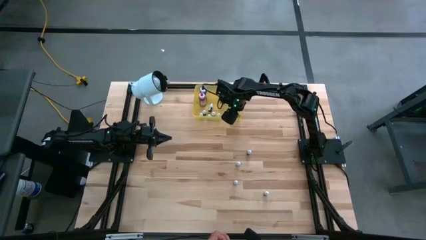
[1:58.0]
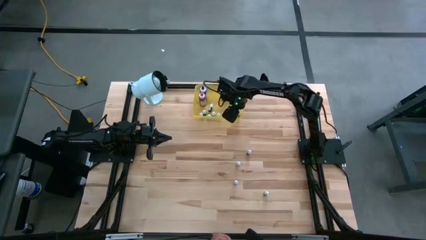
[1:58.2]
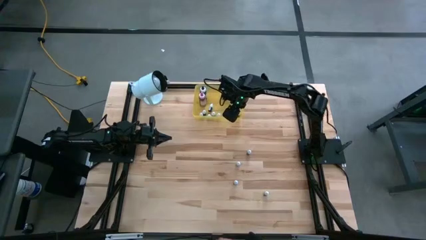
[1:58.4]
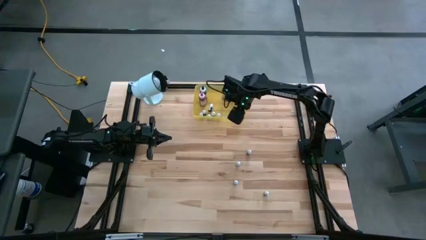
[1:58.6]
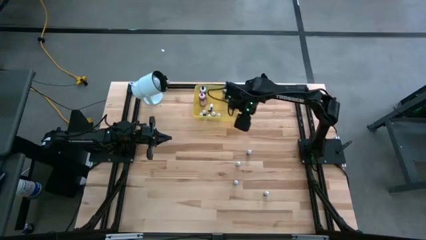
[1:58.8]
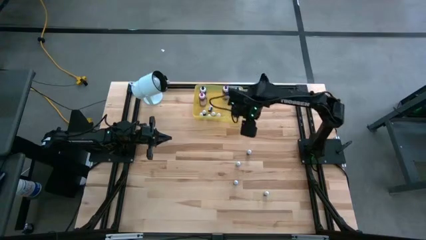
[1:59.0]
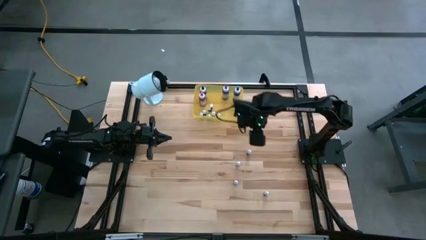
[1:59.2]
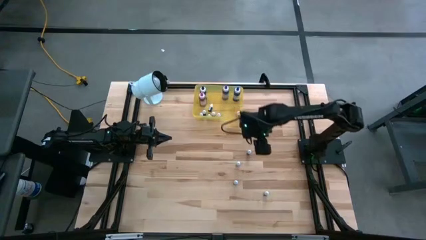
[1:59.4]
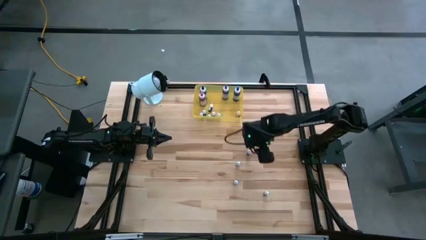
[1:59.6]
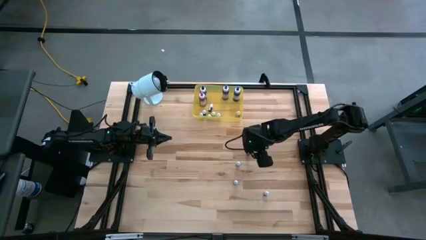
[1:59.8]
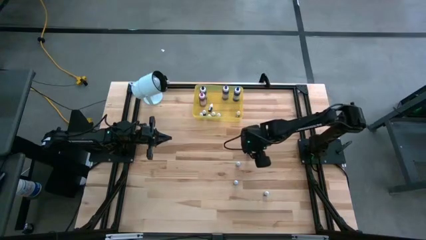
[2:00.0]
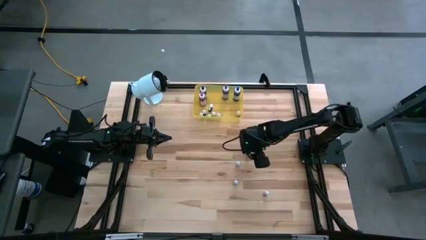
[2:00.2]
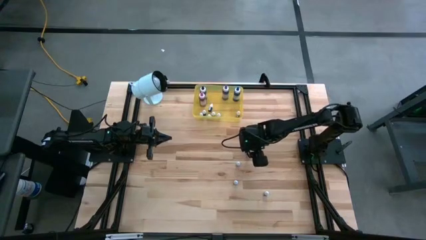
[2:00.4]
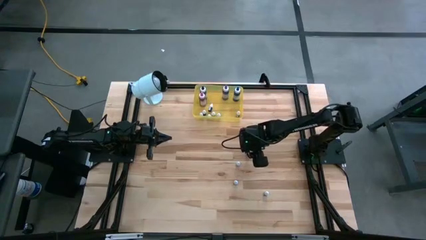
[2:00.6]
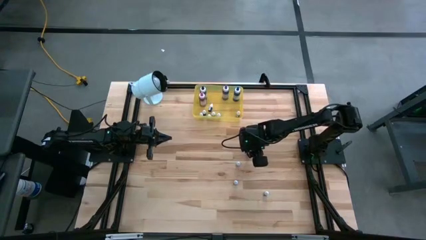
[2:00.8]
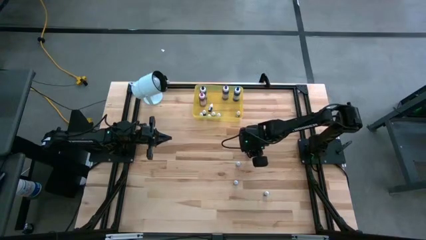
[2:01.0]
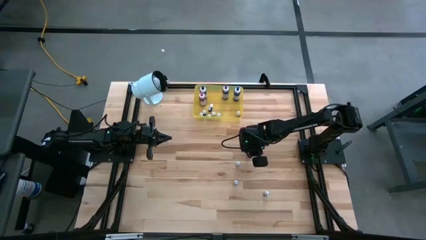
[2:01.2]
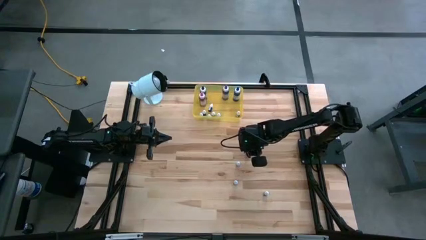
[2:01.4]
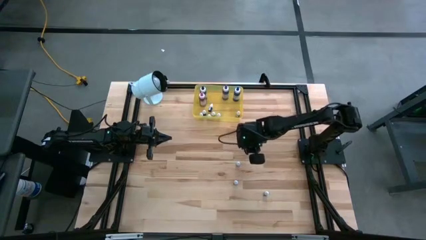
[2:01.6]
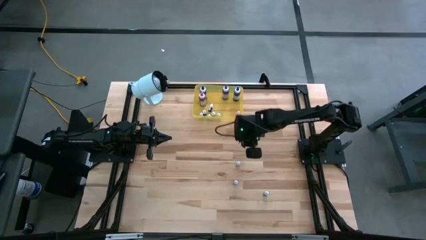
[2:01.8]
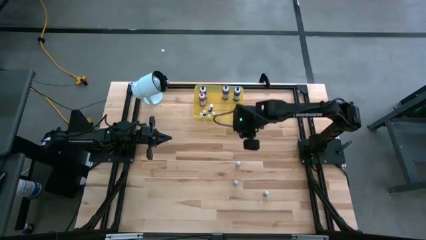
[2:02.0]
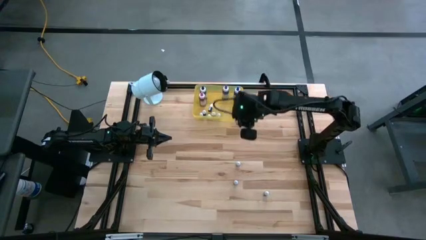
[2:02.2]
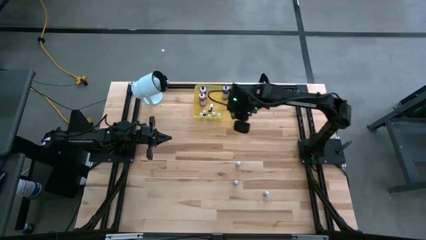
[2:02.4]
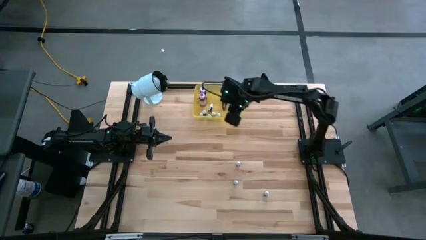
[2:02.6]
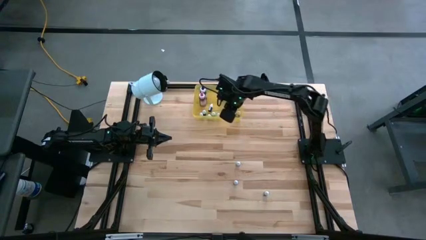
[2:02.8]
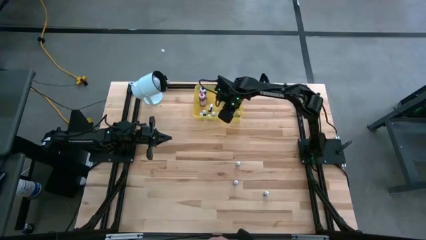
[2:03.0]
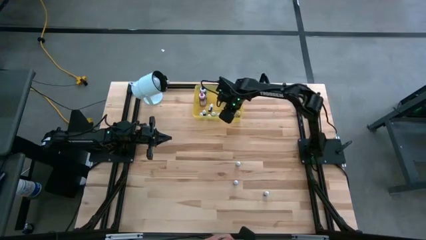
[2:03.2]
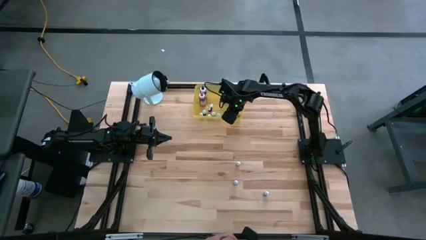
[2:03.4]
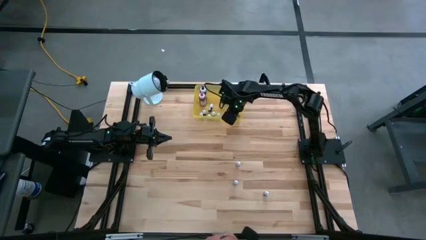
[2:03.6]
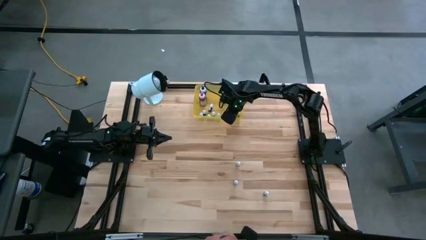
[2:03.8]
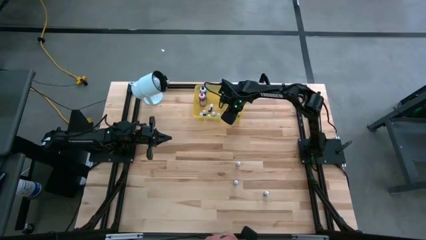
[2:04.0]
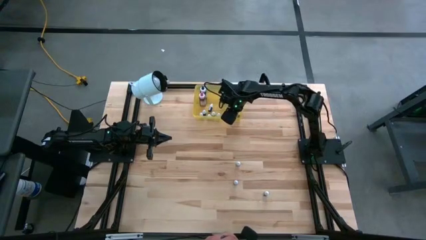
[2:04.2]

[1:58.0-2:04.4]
Task: Pick & Place food coloring
Put the small purple food coloring bottle into the yellow container

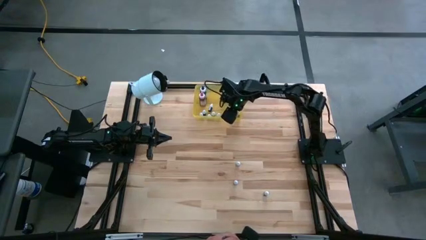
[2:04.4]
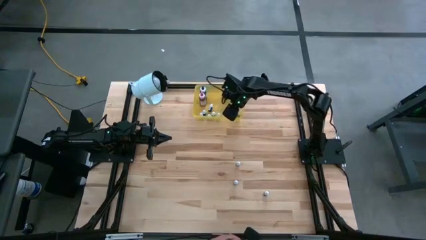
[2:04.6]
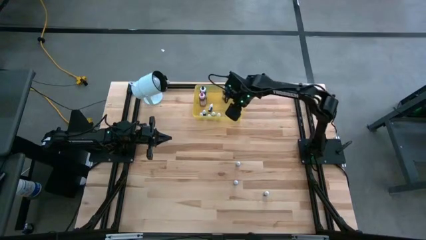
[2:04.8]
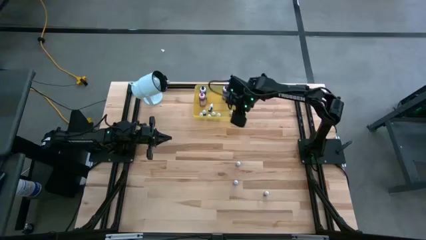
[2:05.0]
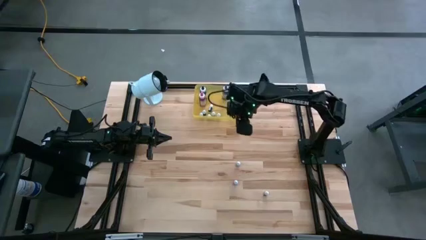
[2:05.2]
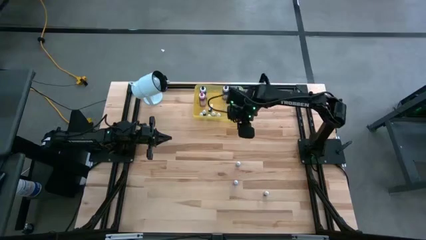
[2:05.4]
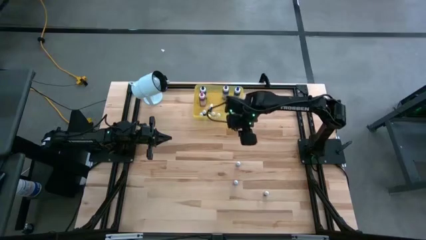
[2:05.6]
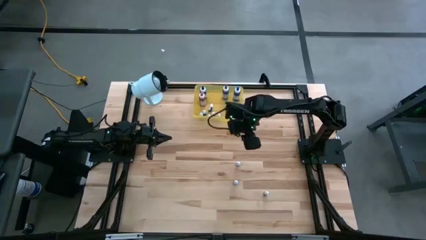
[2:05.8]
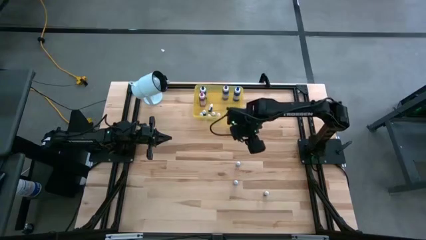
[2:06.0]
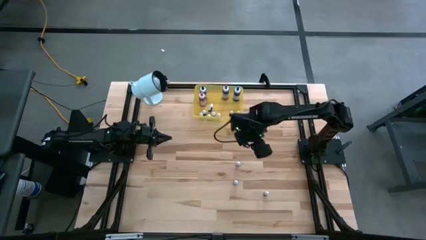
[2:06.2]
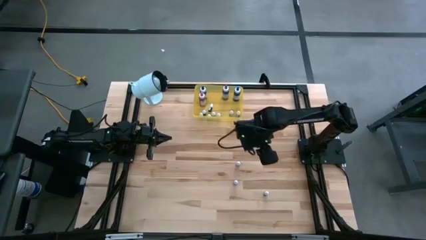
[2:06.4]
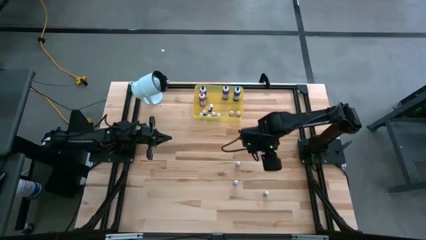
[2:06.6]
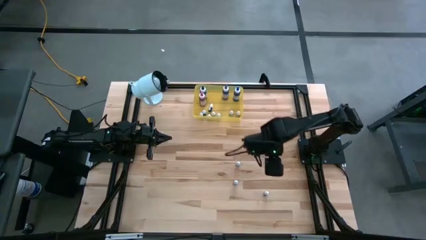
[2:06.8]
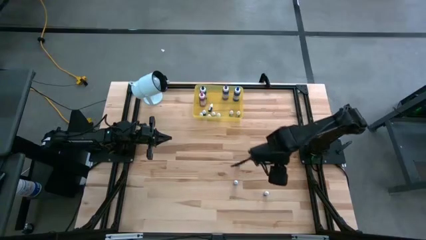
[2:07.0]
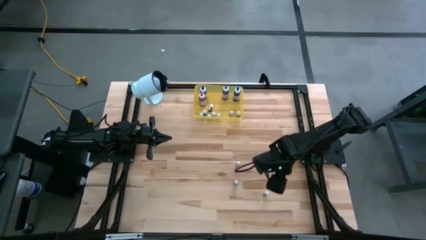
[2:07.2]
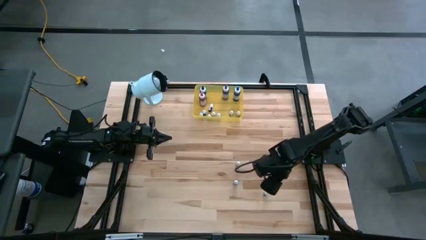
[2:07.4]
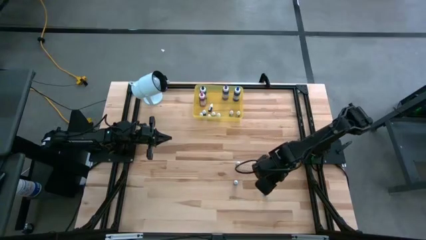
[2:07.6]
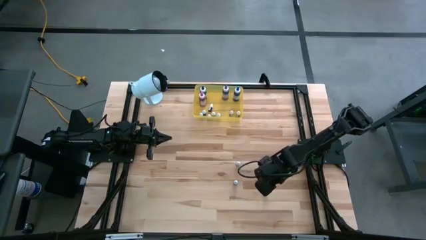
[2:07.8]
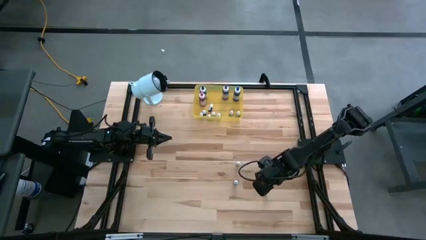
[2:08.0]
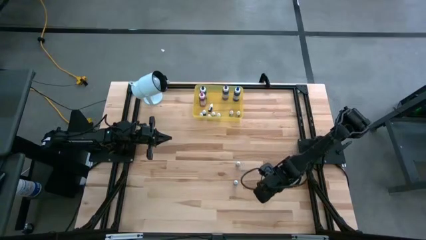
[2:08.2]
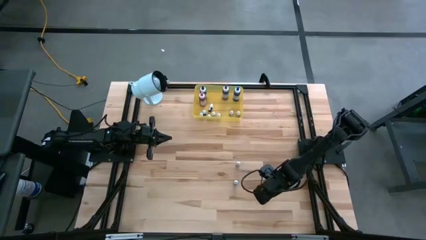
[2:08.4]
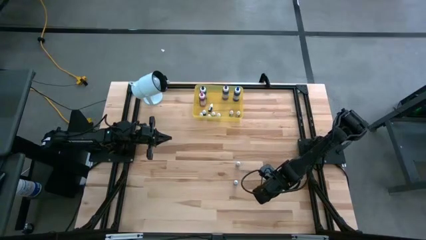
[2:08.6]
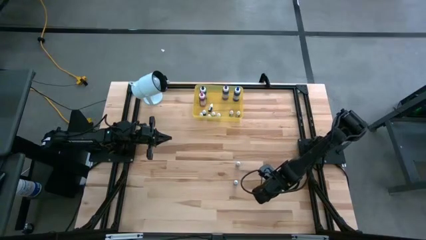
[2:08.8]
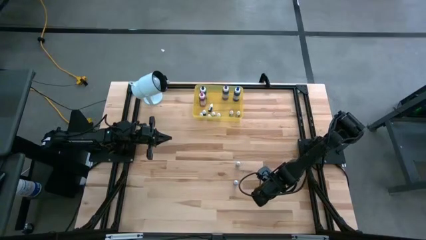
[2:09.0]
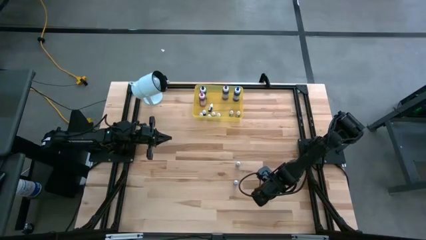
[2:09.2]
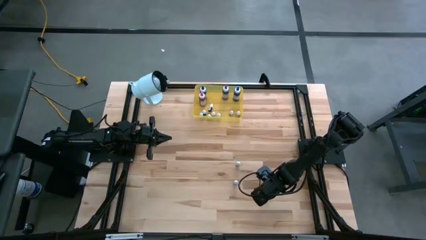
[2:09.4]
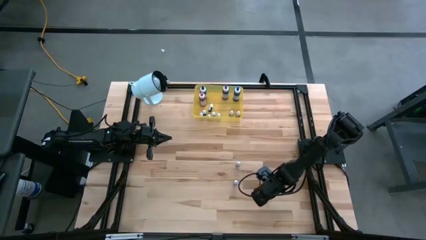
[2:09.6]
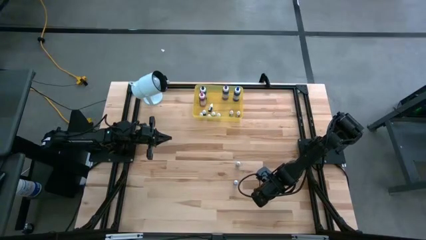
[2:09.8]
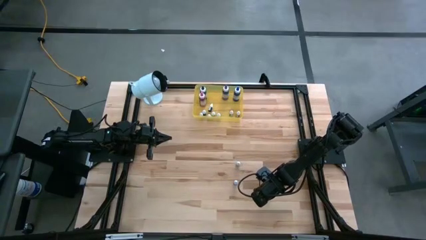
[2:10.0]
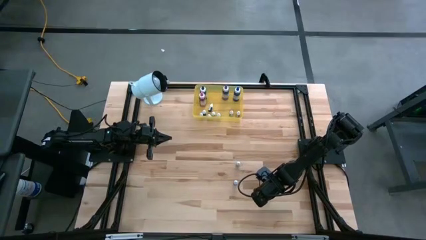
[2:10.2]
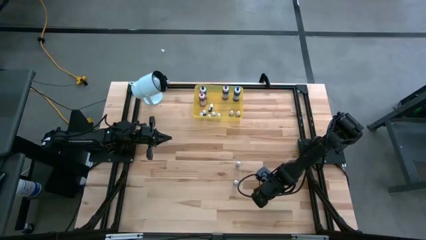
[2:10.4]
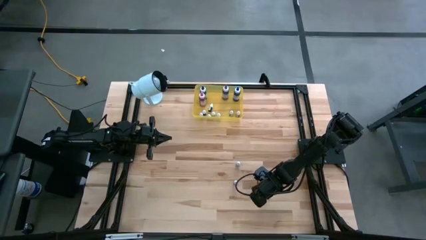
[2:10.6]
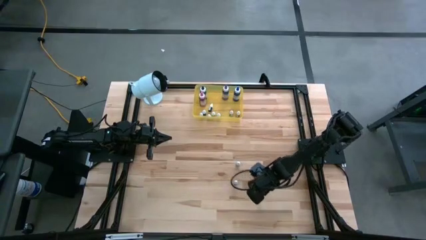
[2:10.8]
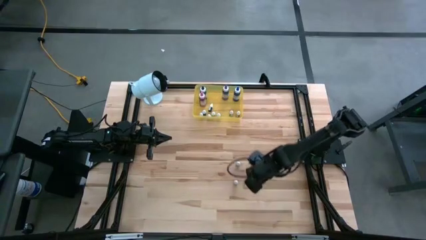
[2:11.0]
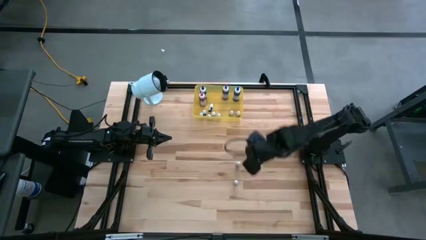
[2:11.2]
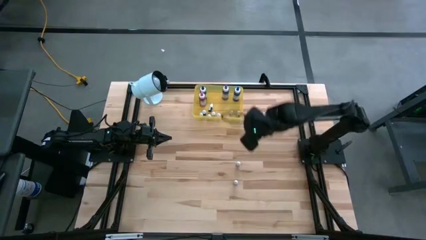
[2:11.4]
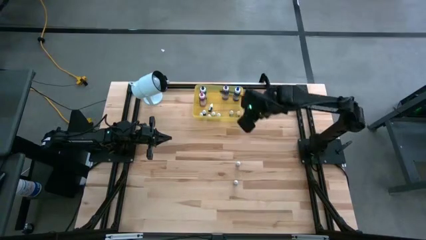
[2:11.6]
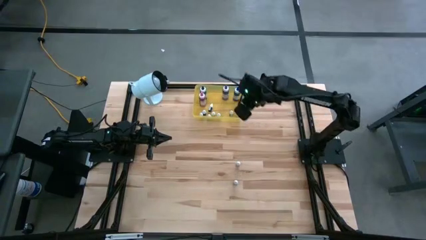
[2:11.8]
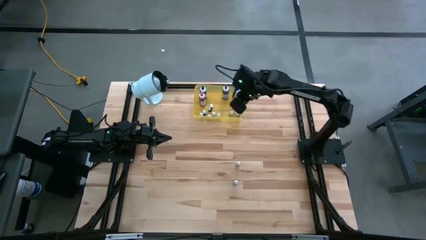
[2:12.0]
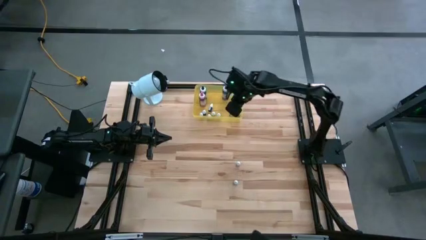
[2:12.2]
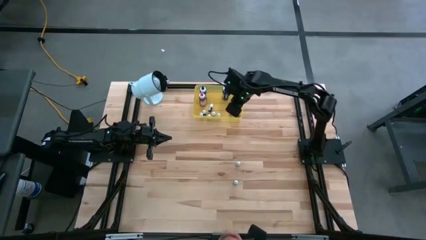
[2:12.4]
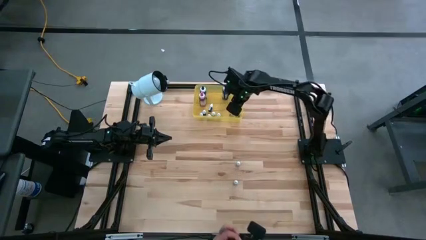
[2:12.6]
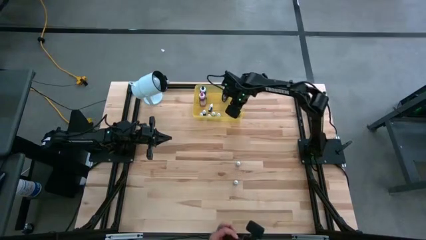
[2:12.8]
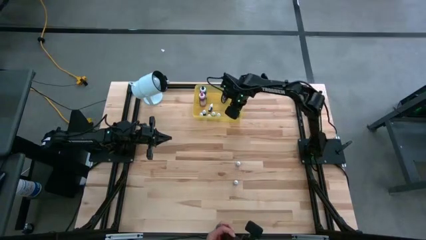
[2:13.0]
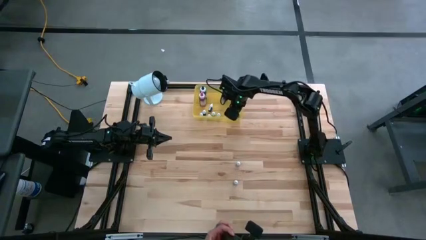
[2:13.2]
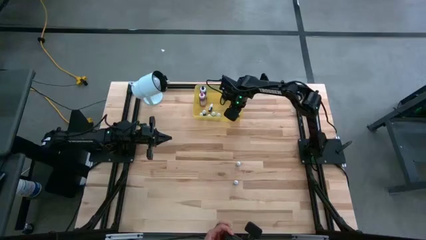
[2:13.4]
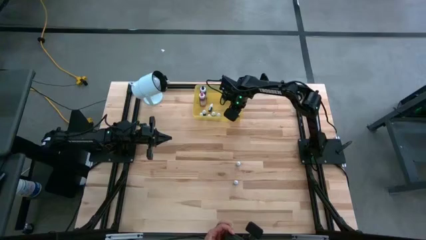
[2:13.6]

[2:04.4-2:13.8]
Put the bottom small light green food coloring bottle into the yellow container

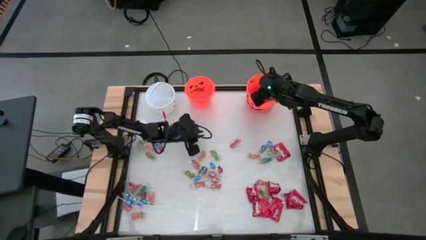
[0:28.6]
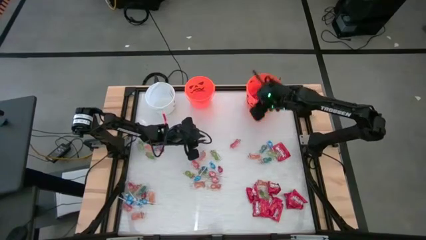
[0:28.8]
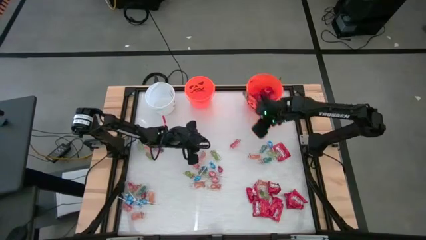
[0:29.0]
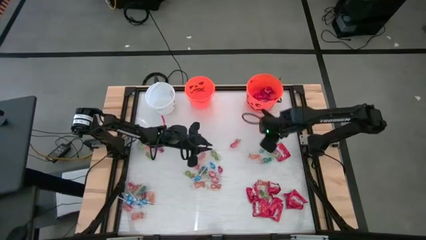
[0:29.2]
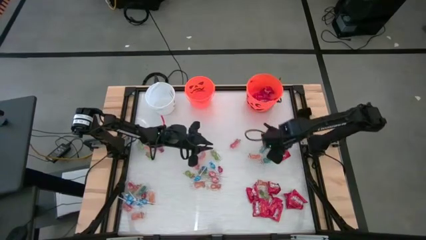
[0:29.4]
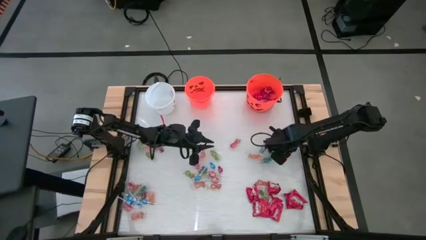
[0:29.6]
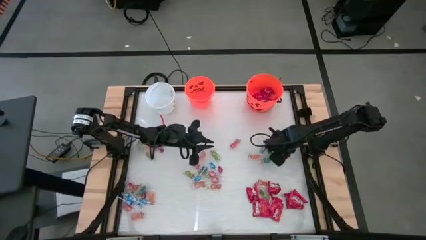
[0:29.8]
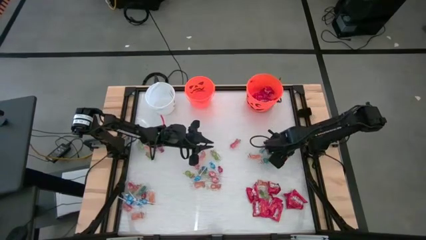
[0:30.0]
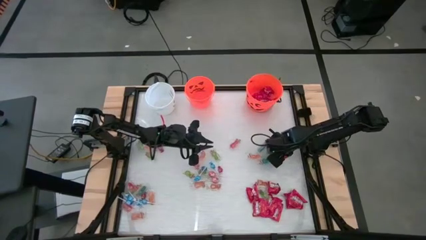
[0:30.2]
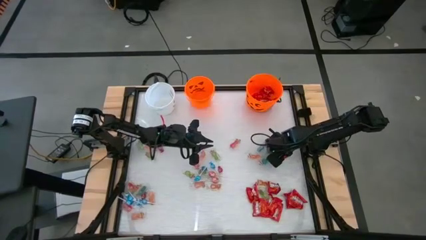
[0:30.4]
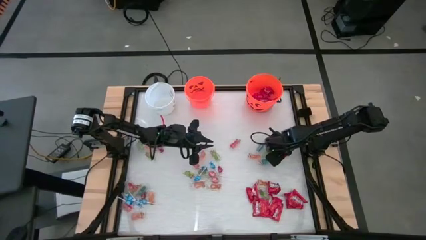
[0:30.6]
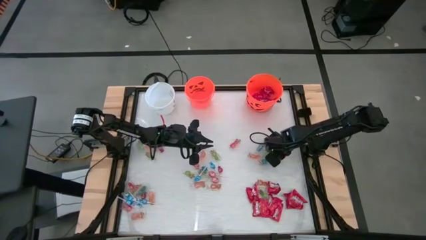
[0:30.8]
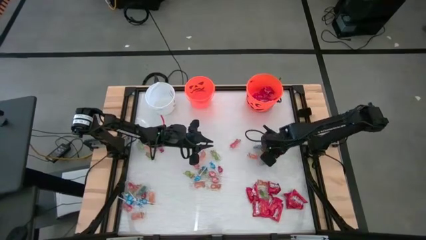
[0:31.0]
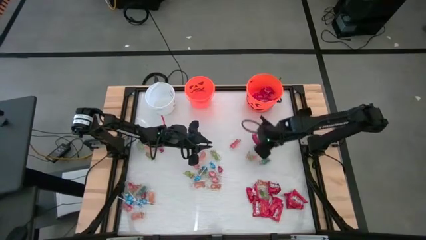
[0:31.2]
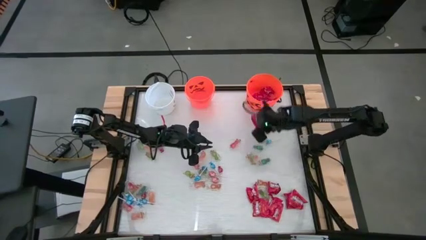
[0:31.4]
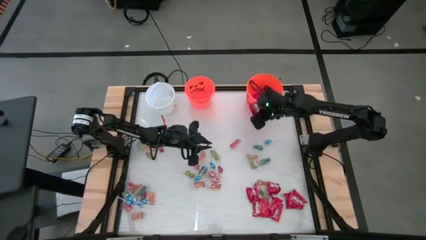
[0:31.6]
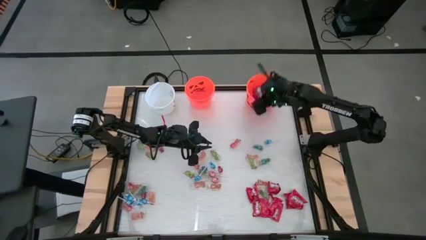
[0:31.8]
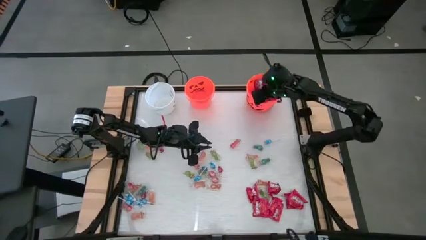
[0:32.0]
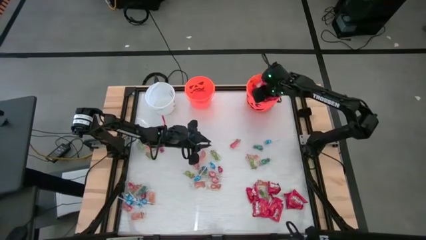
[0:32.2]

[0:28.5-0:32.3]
Task: Sort candy by brand, put in halloween buckets
Put the red candy into the right orange bucket
